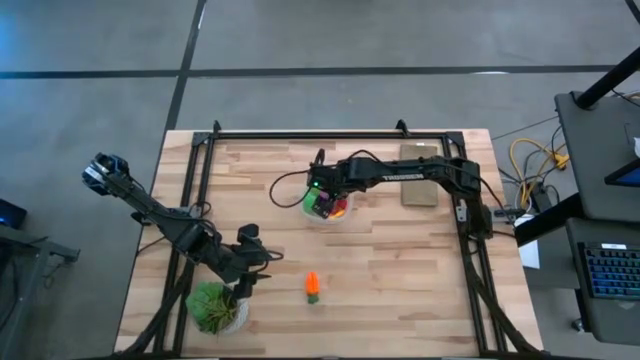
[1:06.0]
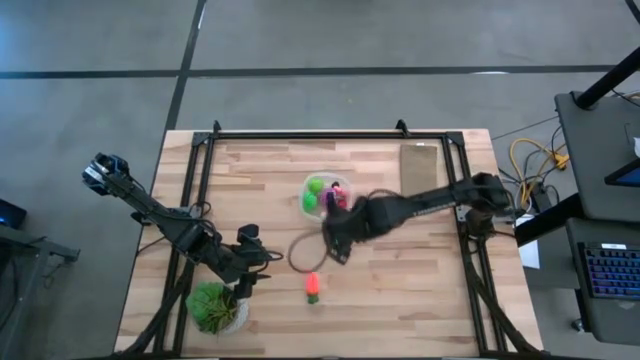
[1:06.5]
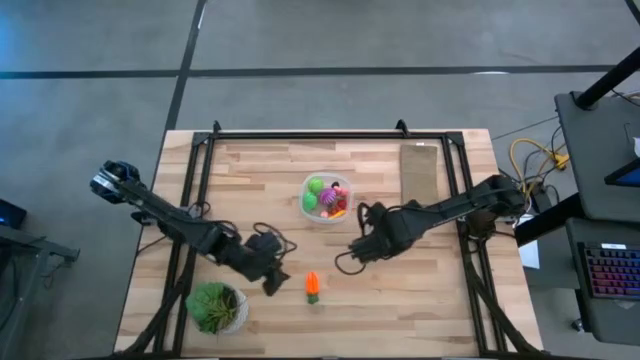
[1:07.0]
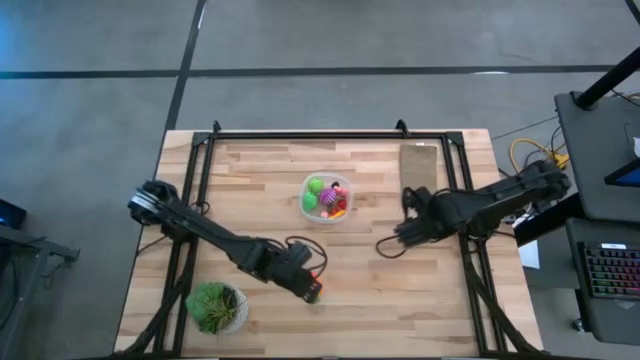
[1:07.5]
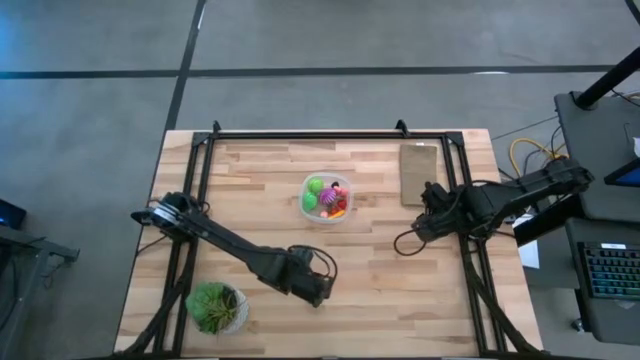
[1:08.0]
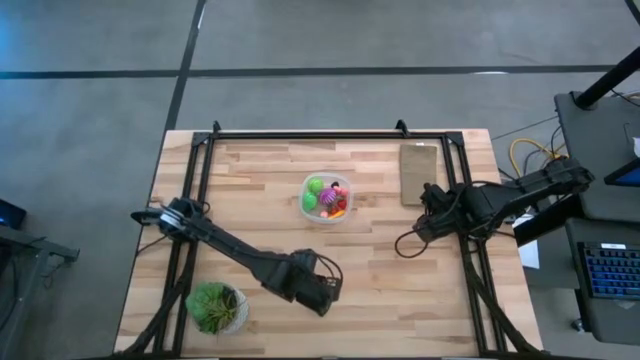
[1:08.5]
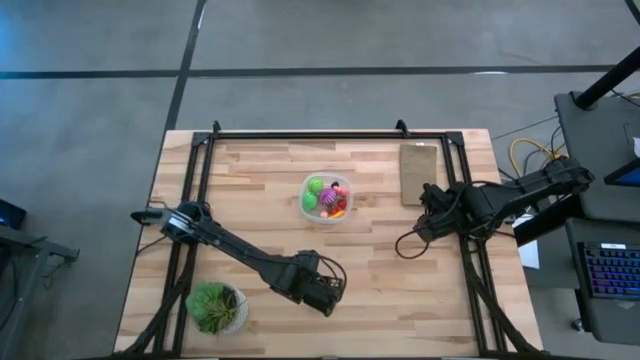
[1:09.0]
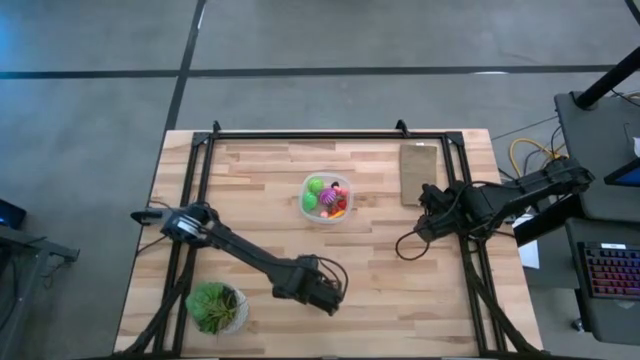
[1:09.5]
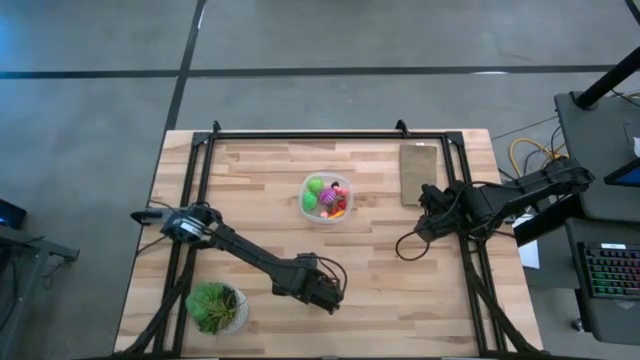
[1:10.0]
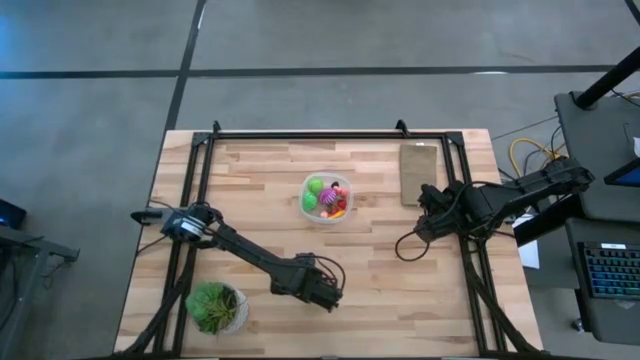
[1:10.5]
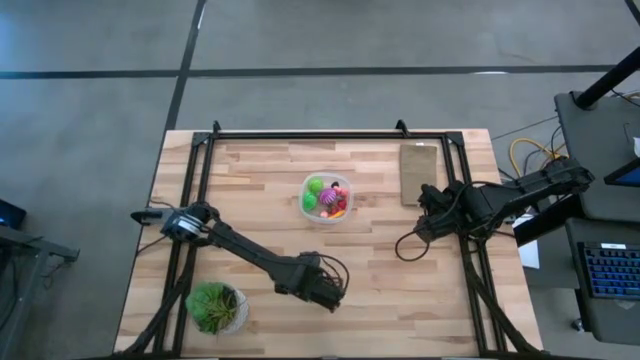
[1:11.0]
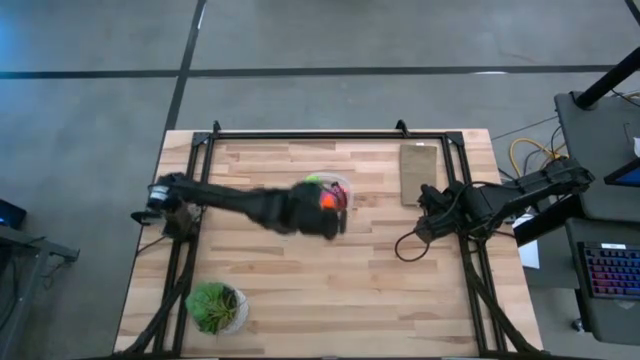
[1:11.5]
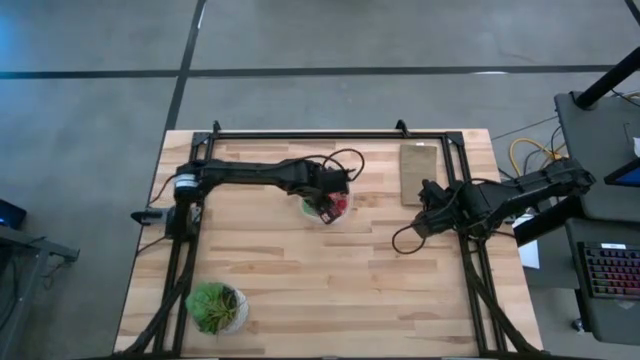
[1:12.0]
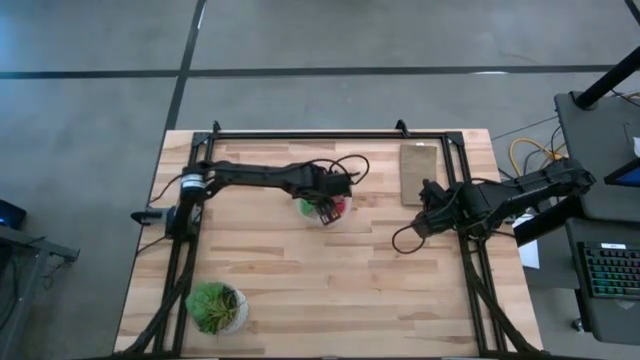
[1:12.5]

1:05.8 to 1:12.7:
Task: Pick and placing Produce into tupperware
Put the orange carrot into the transparent container

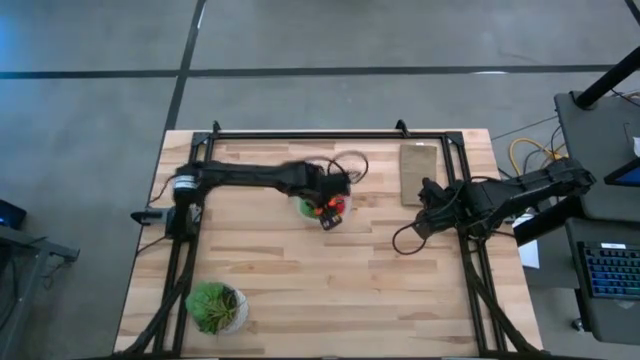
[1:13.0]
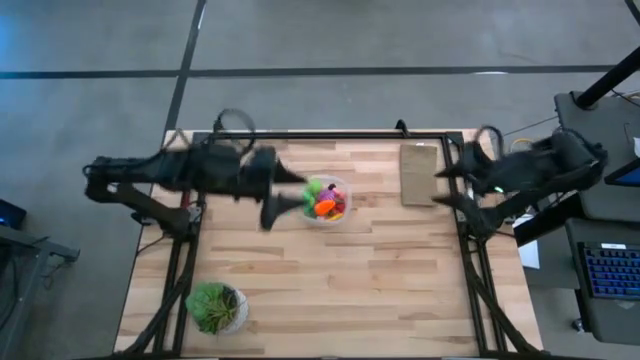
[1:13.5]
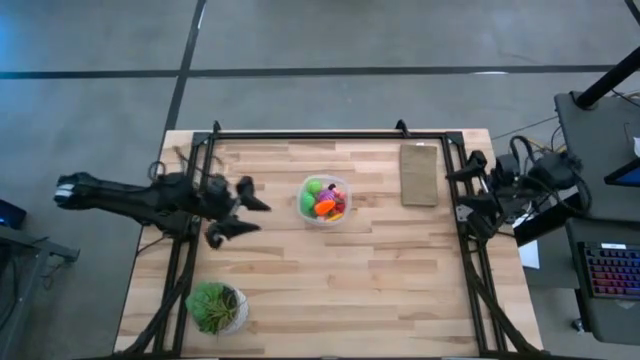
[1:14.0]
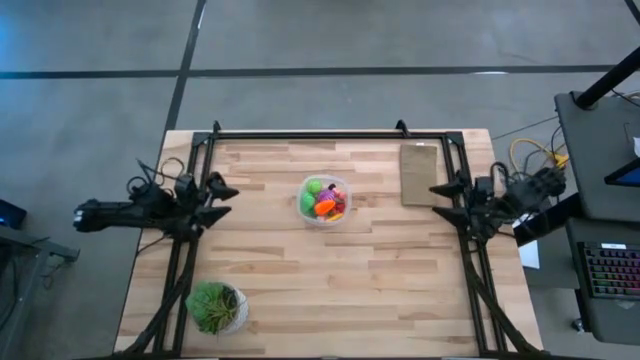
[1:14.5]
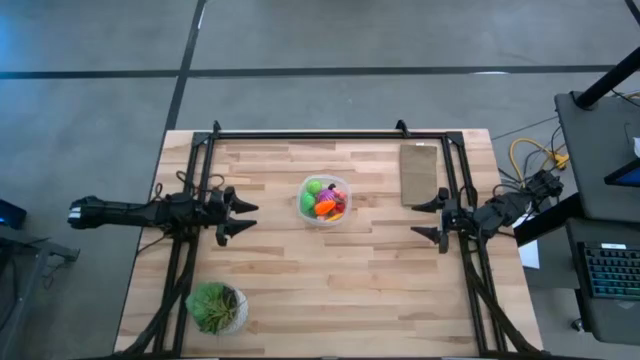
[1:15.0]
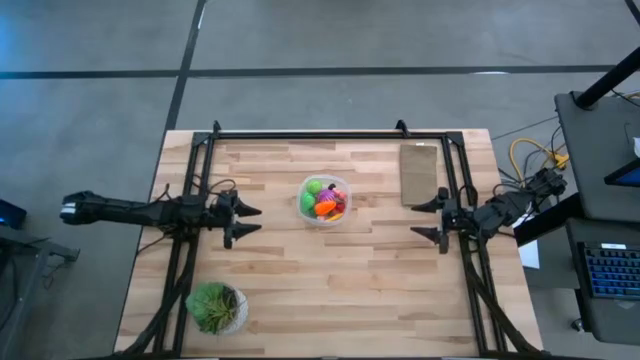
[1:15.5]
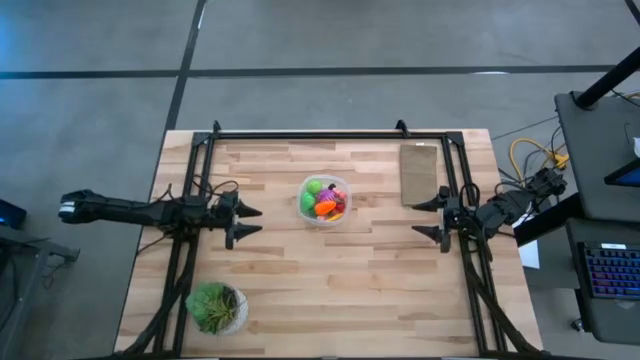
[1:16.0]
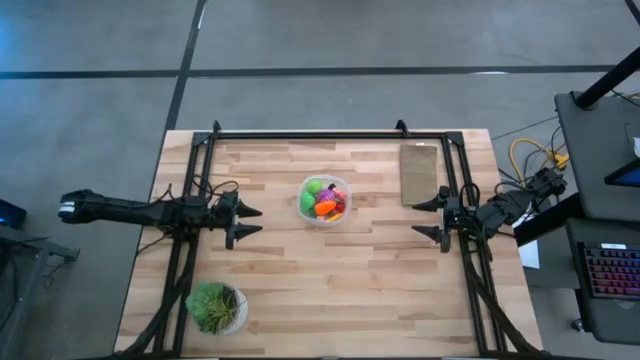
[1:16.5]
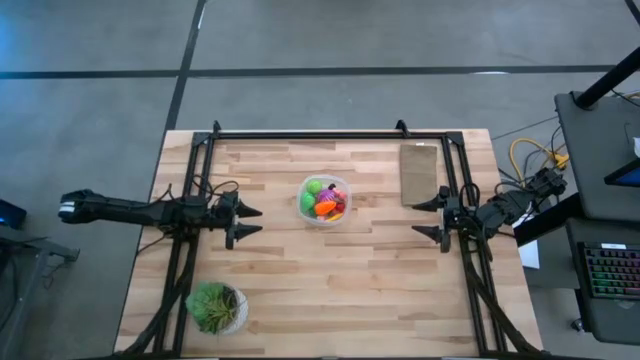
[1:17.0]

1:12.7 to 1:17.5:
Return to Home Position

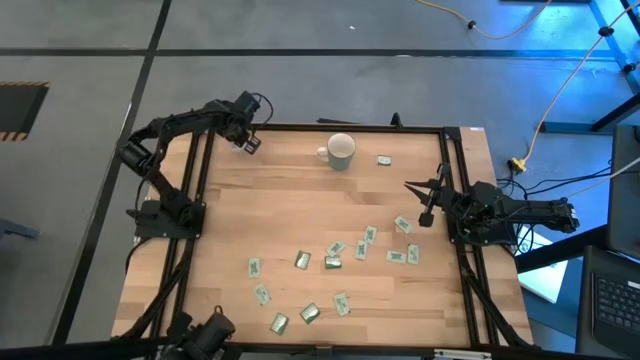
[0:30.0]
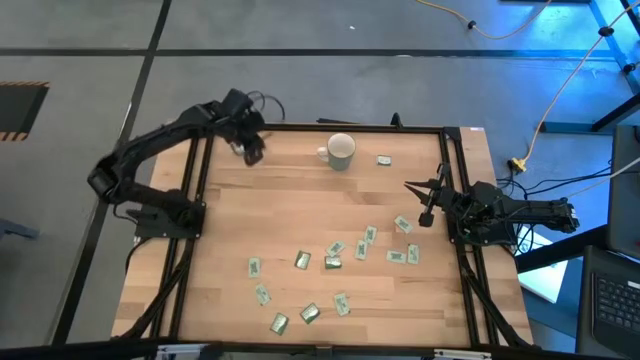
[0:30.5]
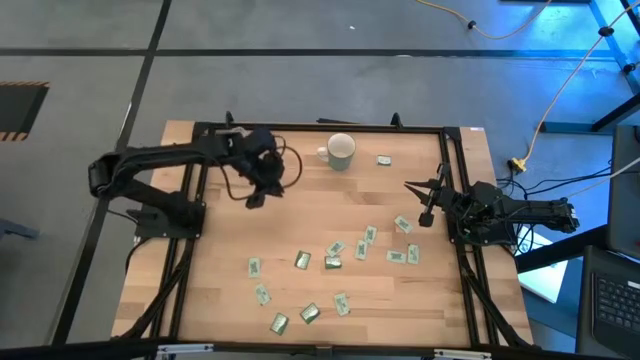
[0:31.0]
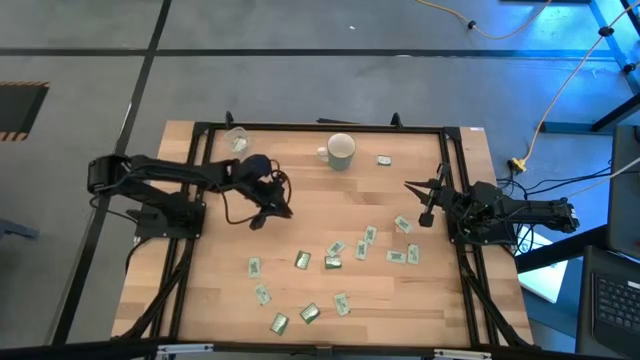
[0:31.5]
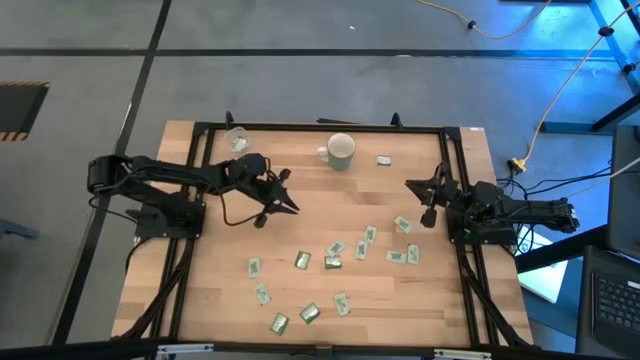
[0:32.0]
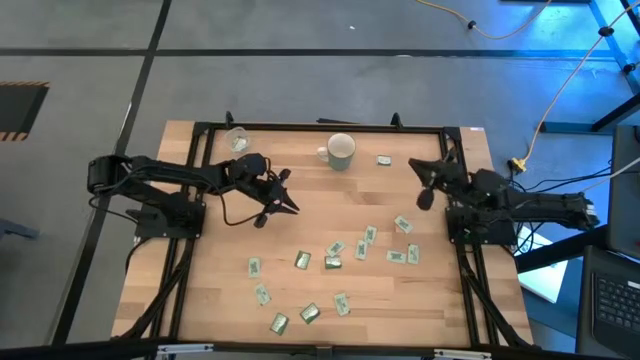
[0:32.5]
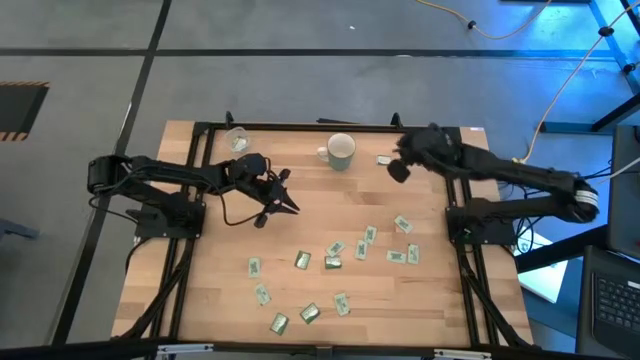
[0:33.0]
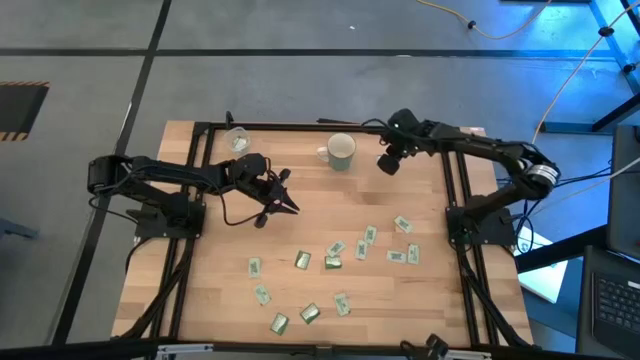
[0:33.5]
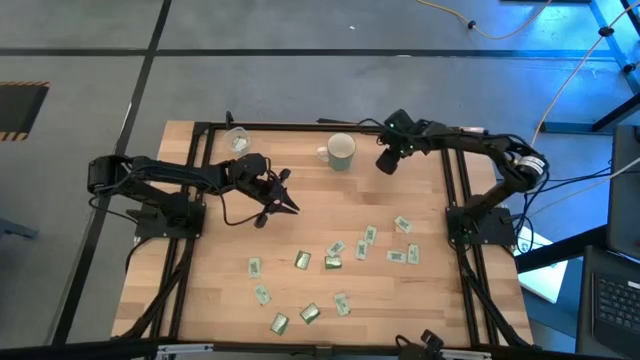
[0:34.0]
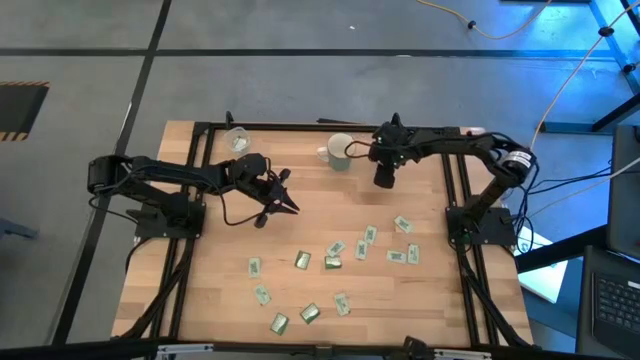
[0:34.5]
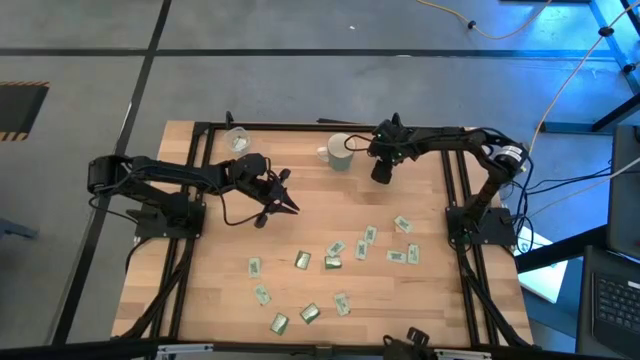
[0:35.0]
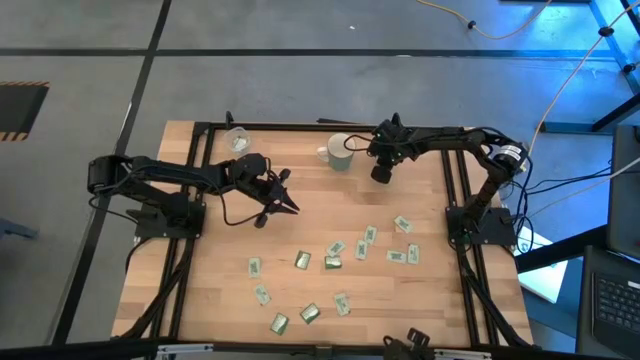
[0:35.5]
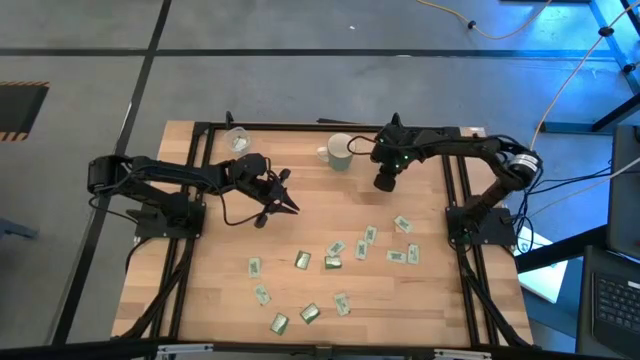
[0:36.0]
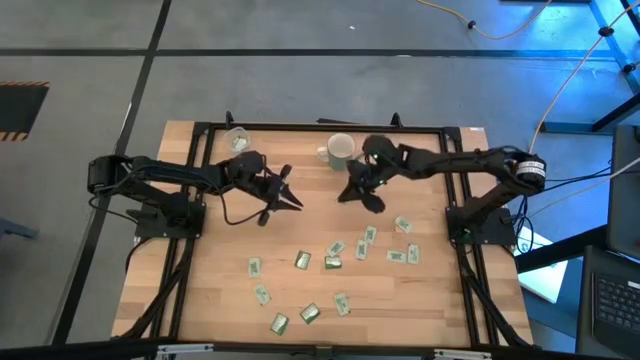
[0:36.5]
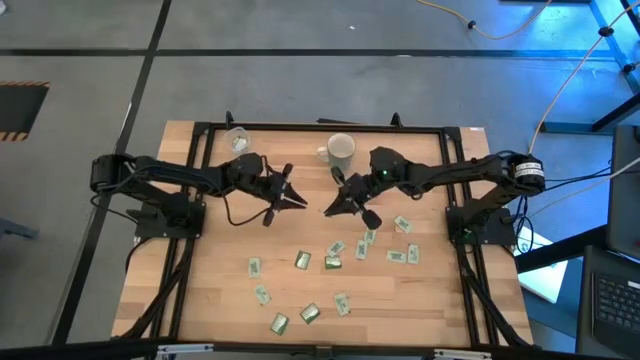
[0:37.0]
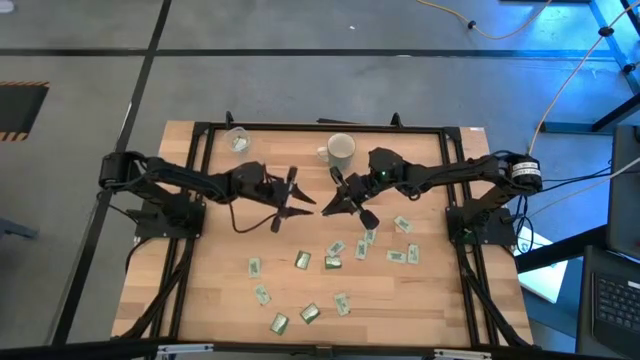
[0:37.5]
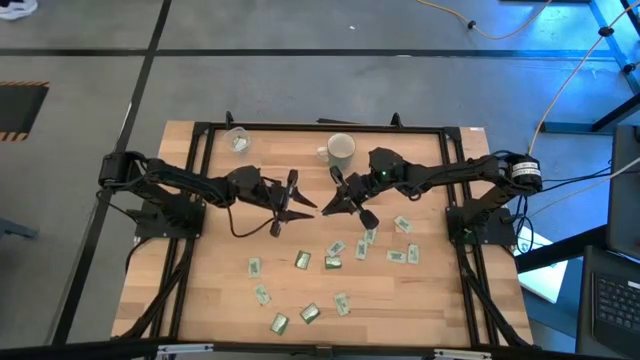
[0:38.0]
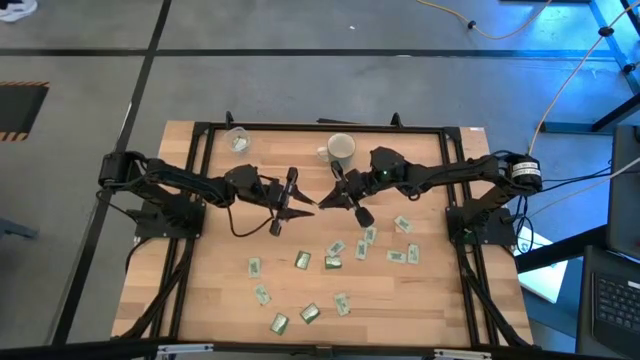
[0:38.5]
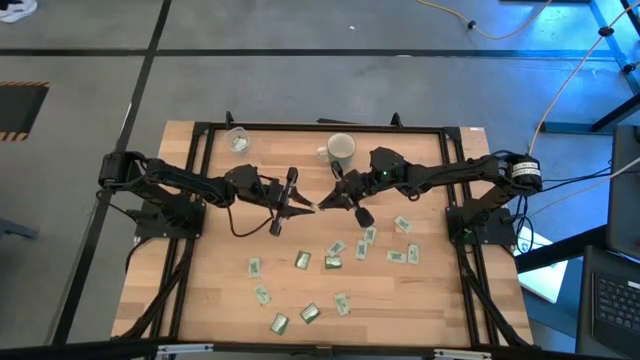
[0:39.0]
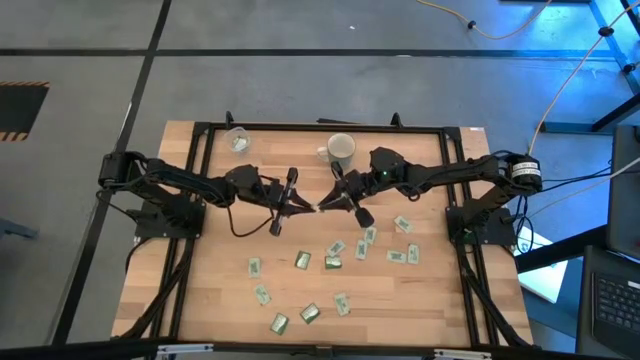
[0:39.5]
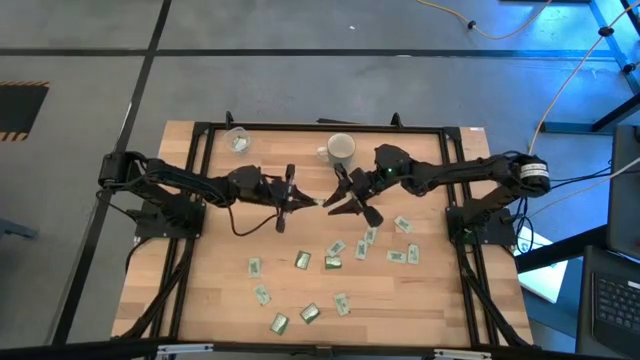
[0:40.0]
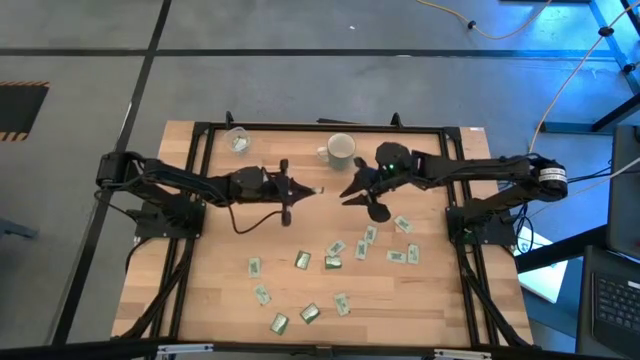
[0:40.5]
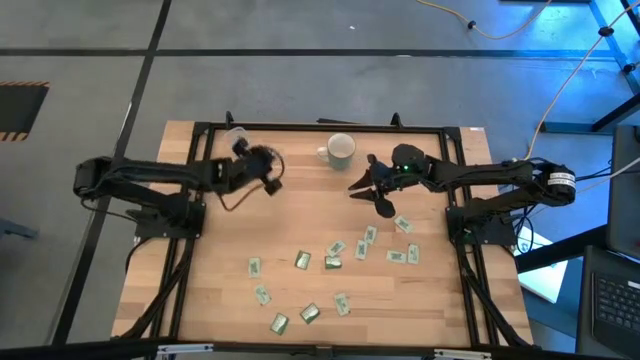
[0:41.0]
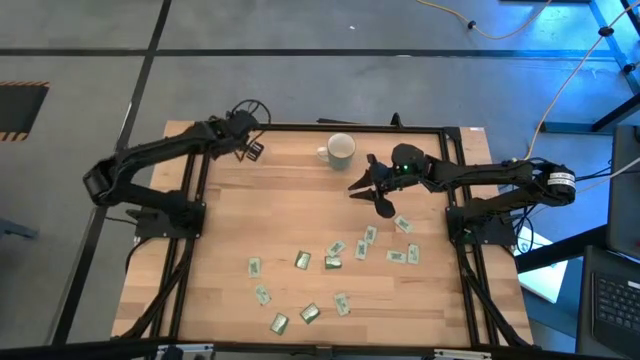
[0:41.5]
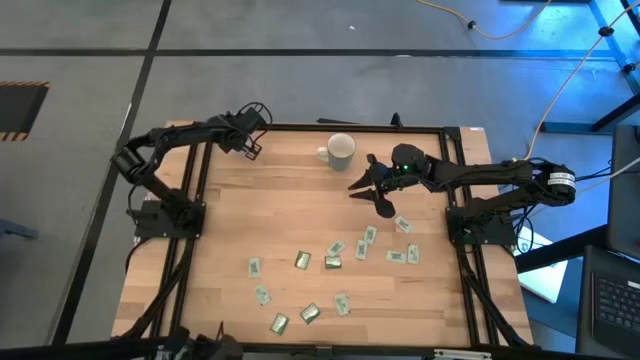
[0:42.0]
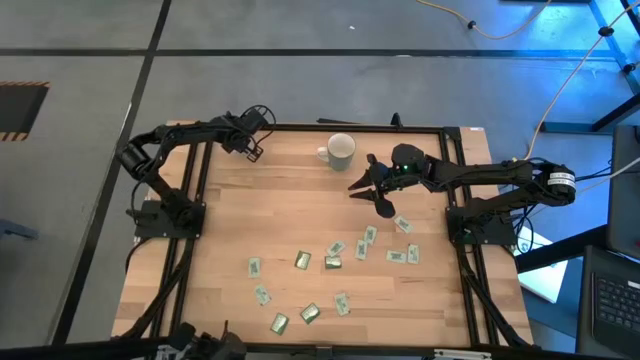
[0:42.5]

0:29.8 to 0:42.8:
Task: Pick and place Stevia / Truvia into bins
Put the truvia packet into the transparent bin
